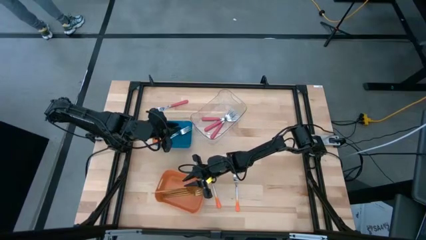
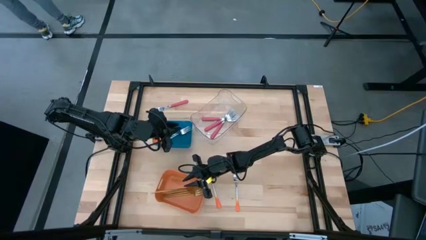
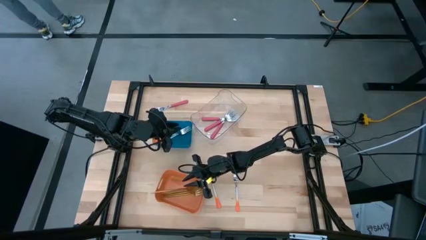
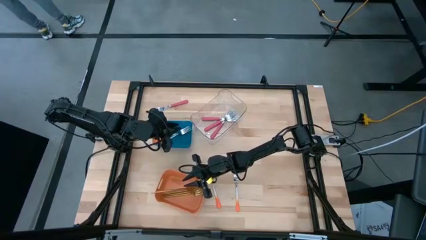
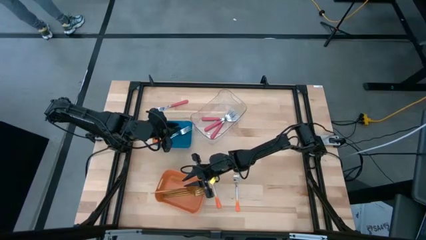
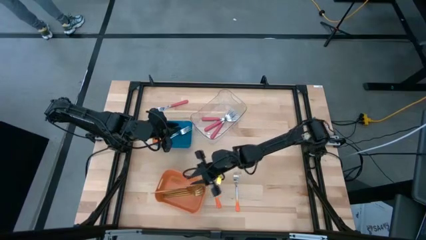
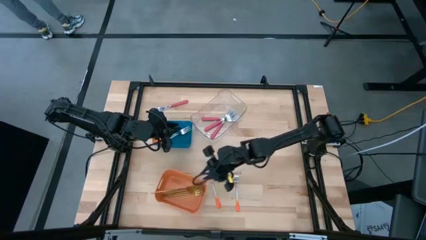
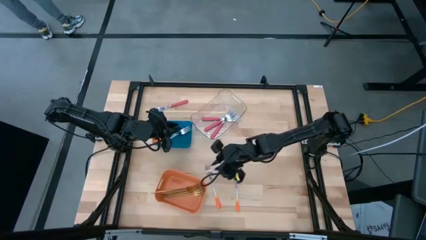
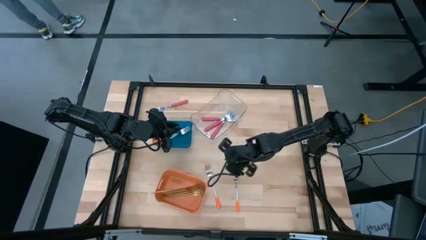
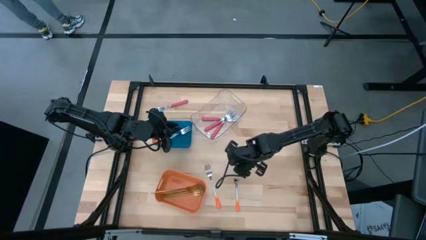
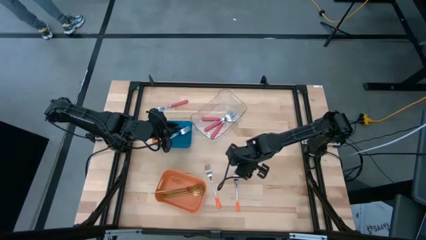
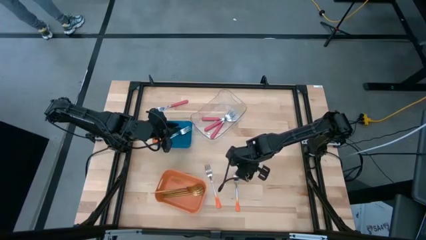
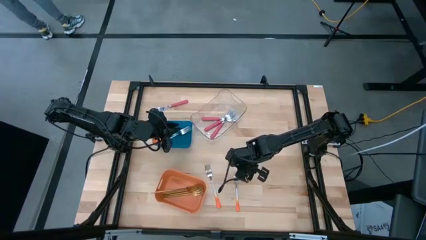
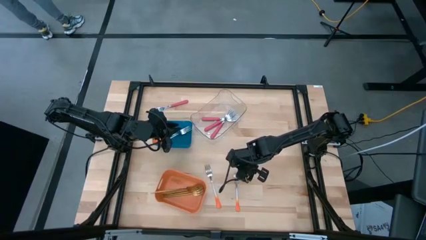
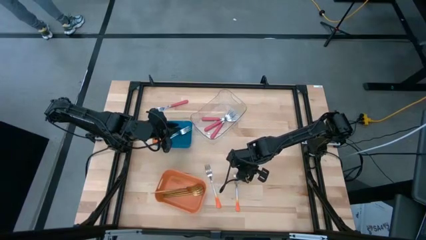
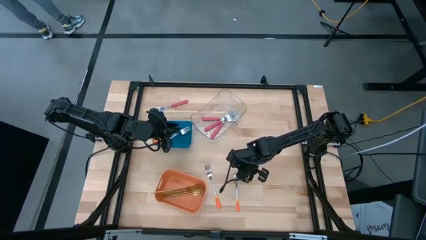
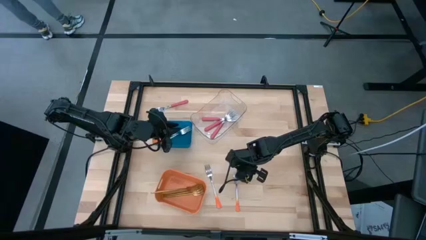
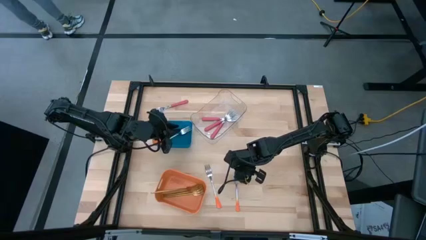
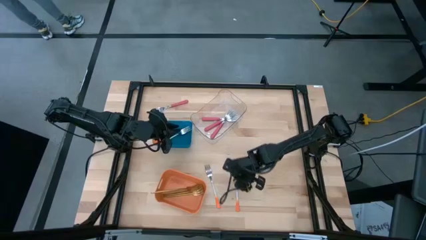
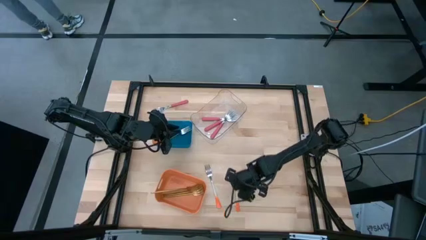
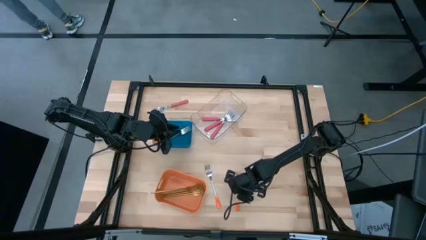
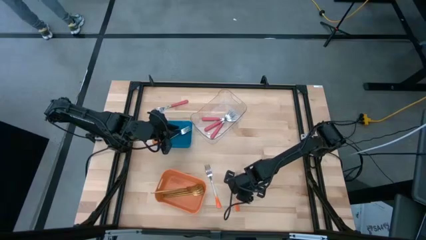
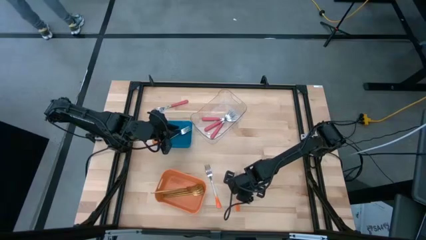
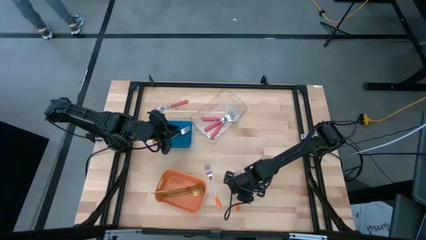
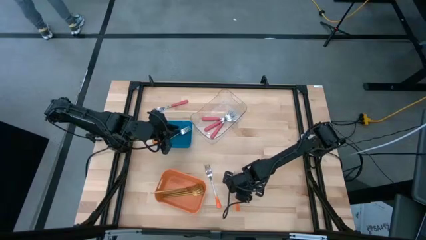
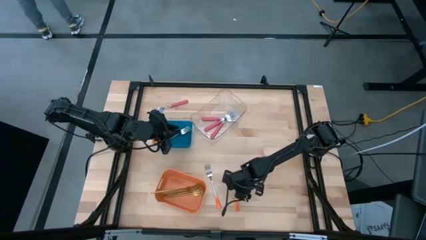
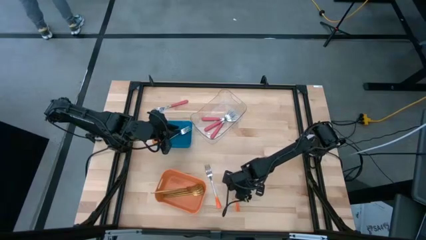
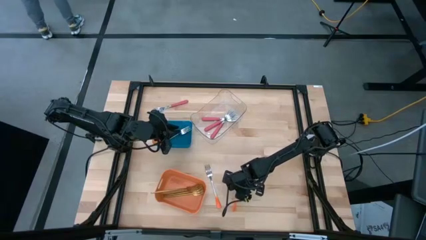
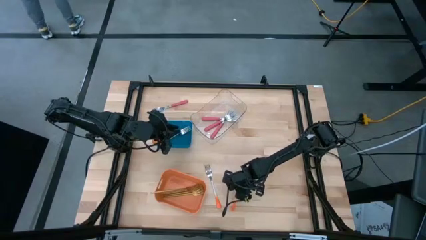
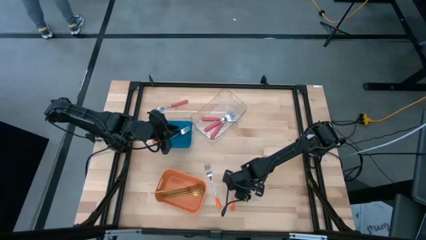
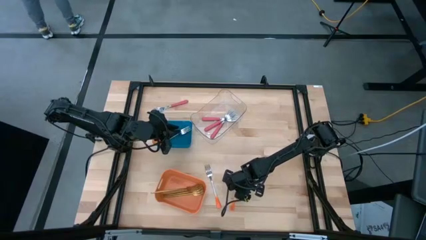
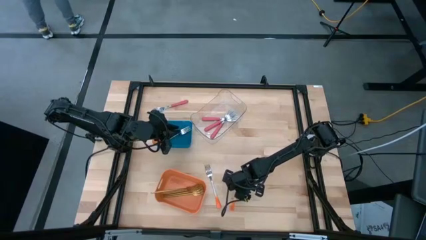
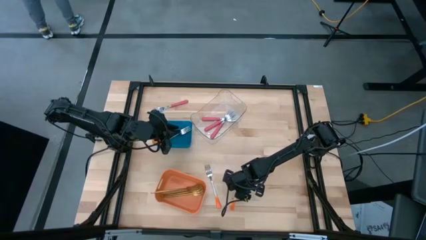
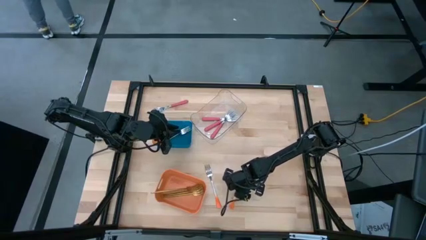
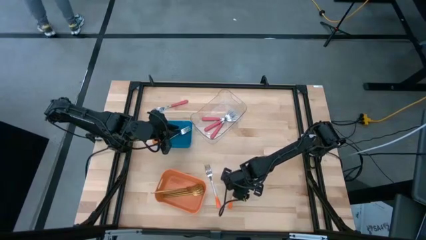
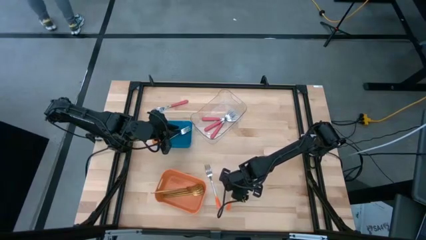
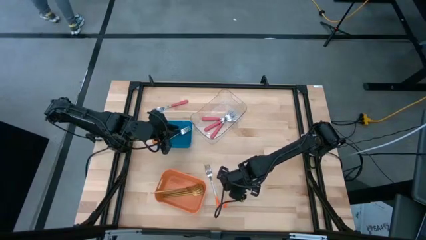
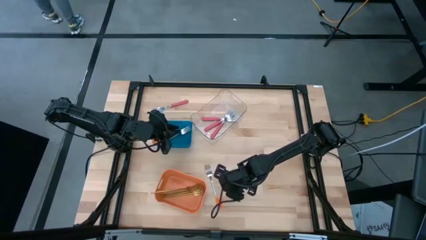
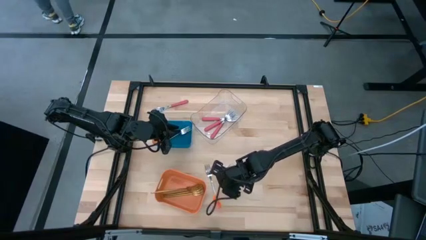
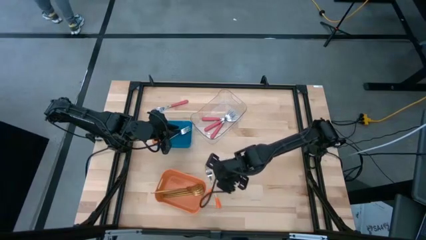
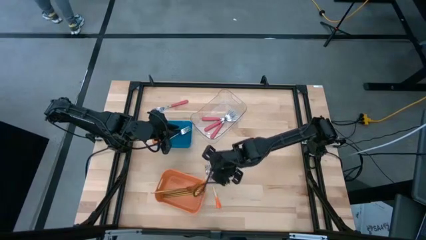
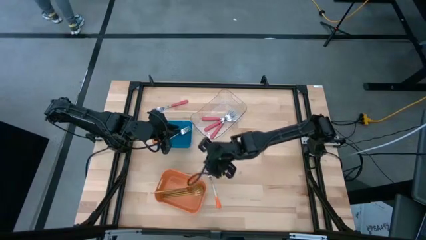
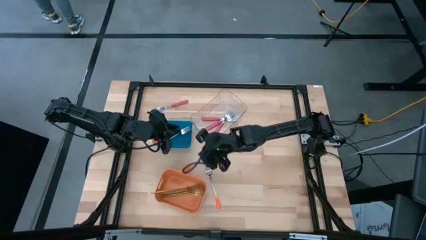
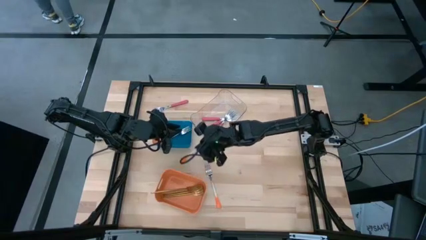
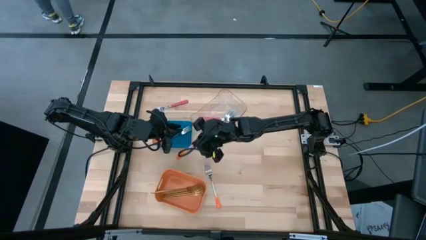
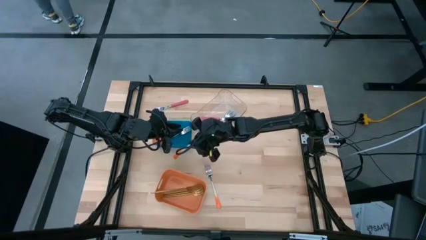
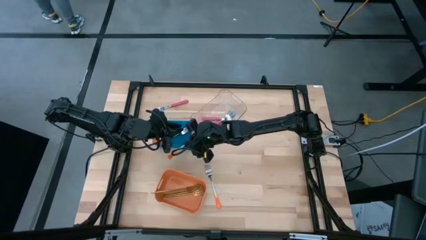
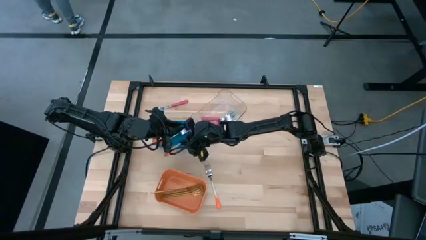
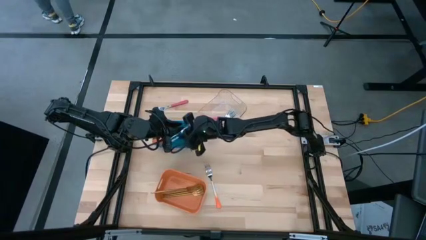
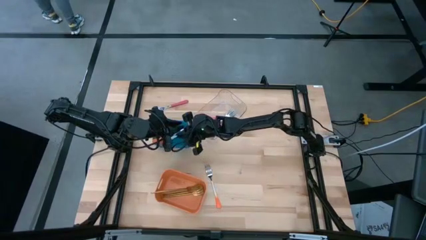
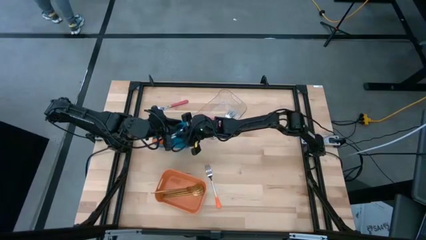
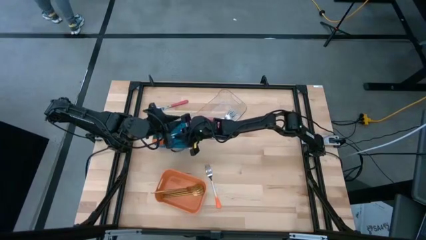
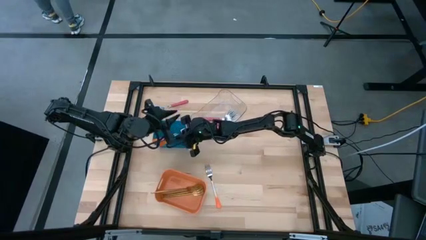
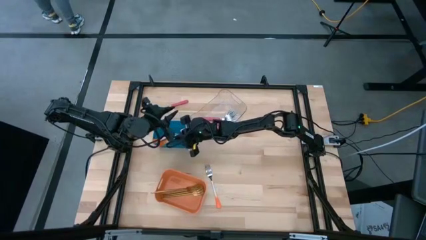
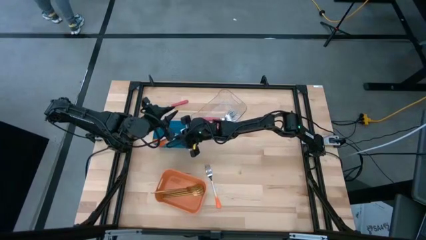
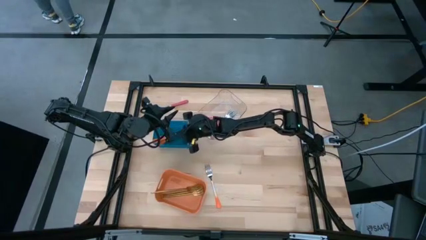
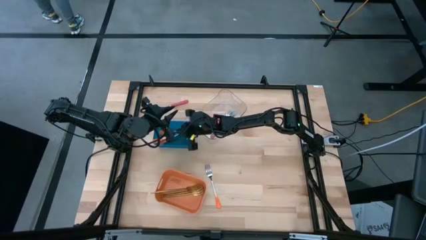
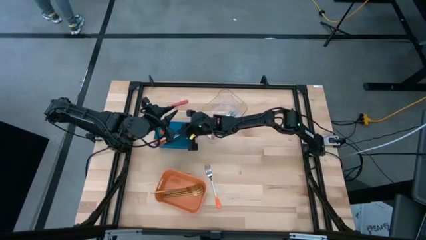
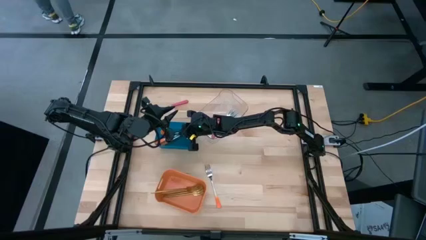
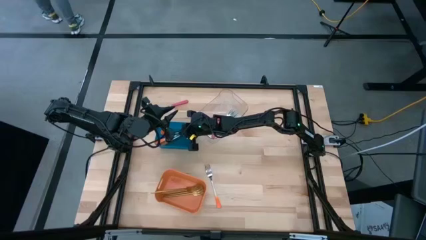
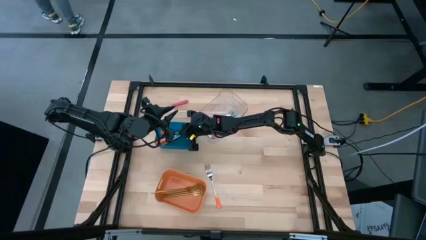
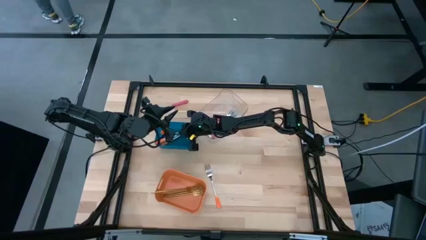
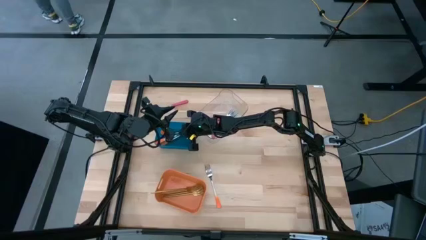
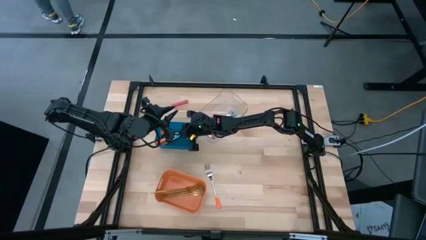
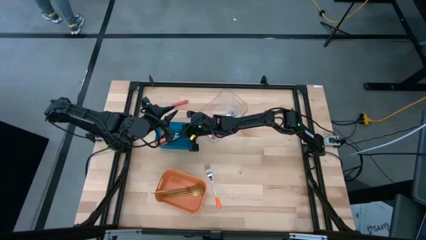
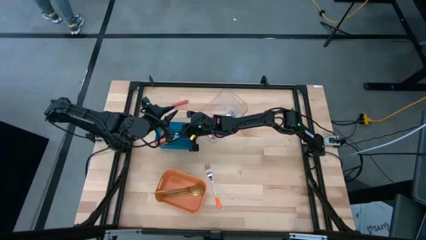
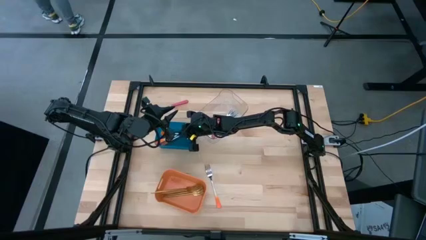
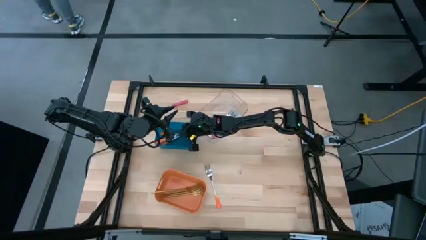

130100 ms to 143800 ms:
Task: Sort silverware by color (type)
Put the orange fork into the blue bin

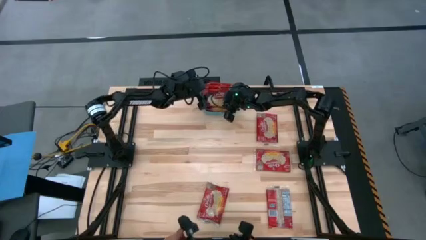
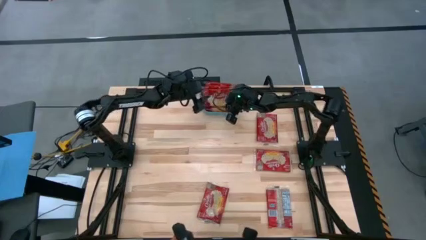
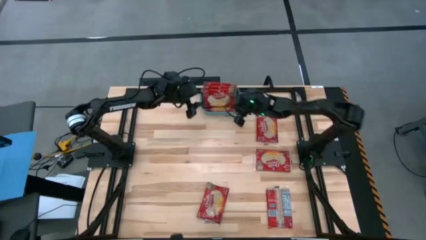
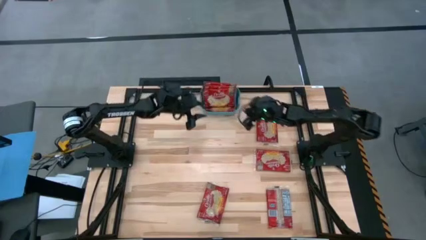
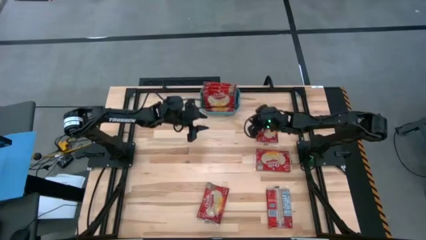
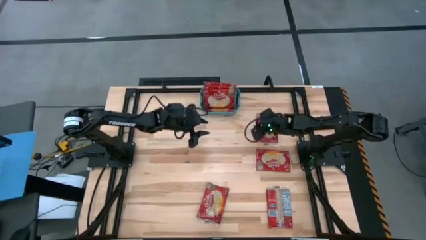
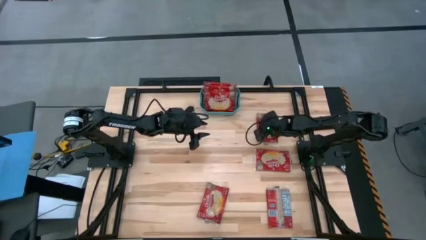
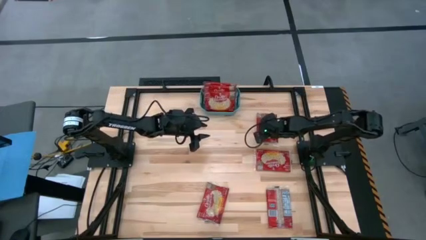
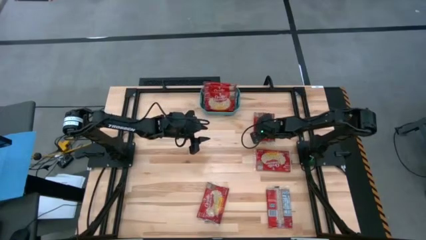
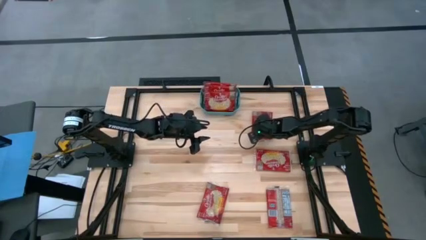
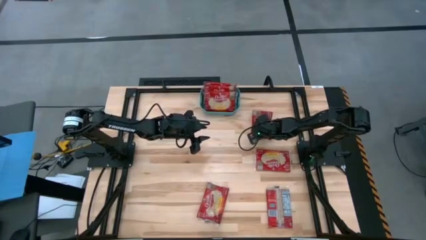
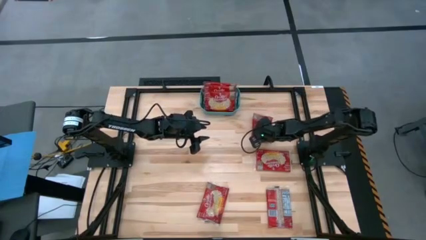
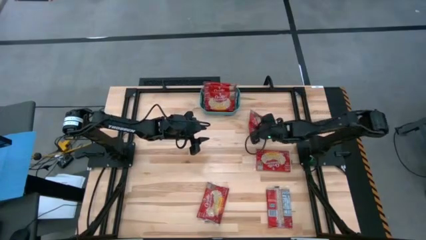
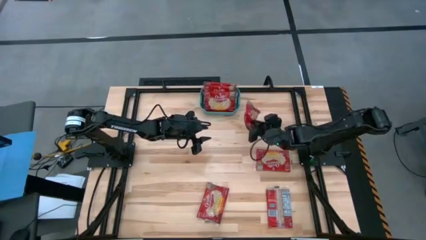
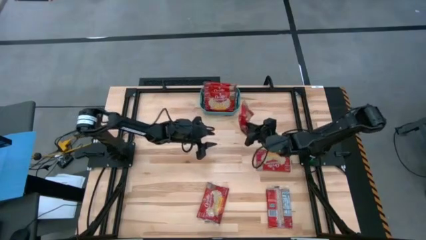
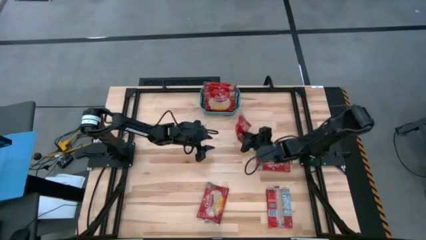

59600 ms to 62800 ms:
Task: Sort popcorn bags into baskets
Put the red popcorn bag into the blue bin
